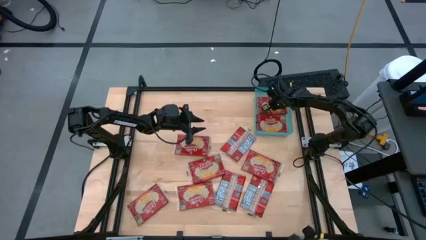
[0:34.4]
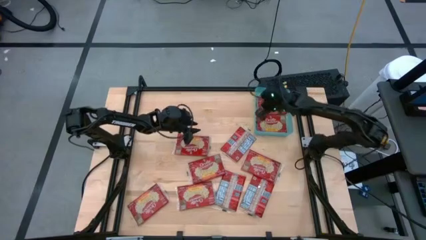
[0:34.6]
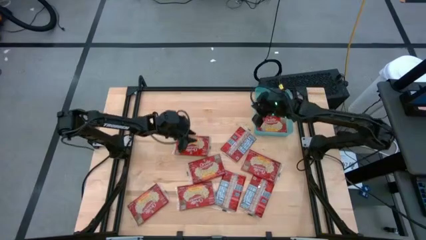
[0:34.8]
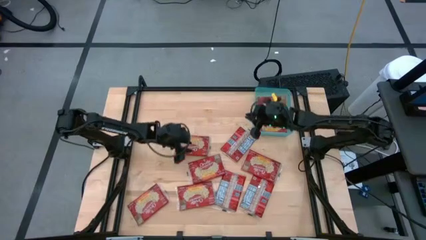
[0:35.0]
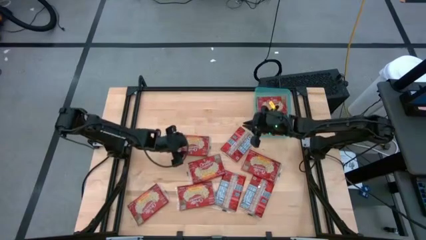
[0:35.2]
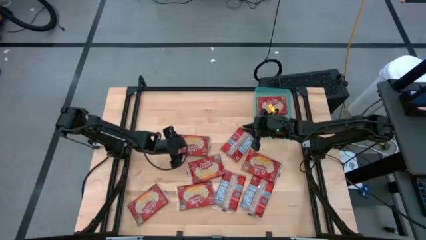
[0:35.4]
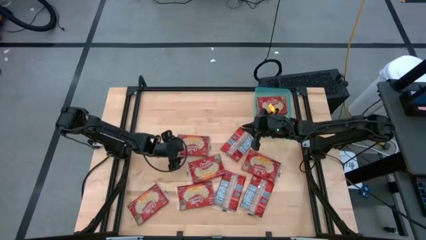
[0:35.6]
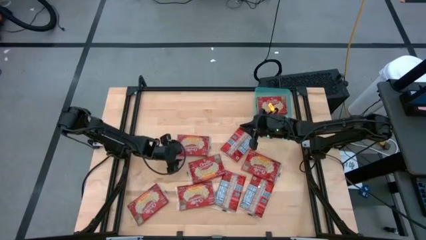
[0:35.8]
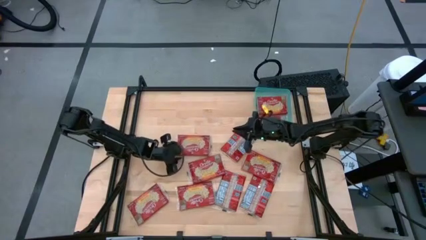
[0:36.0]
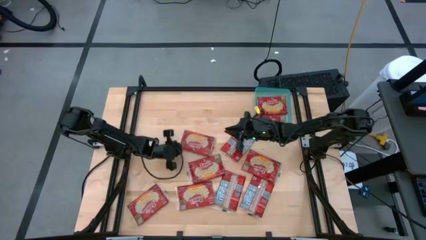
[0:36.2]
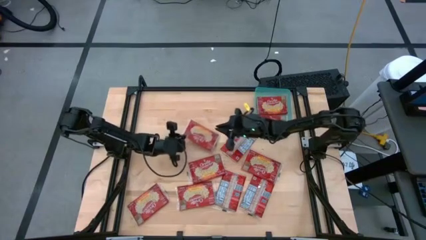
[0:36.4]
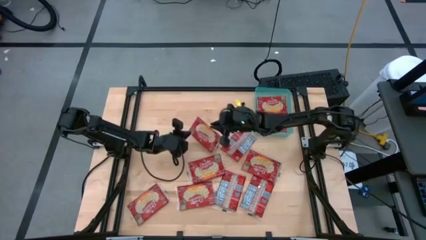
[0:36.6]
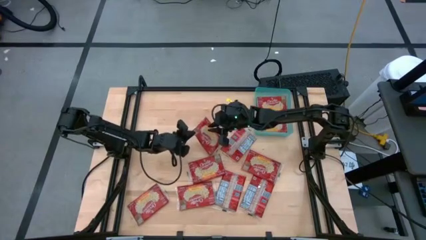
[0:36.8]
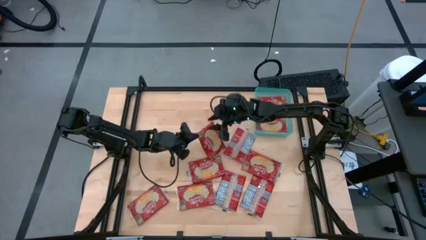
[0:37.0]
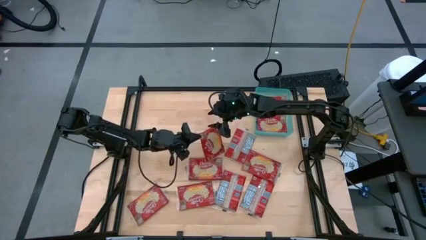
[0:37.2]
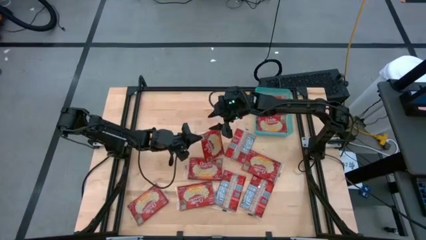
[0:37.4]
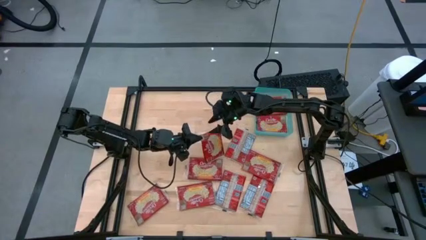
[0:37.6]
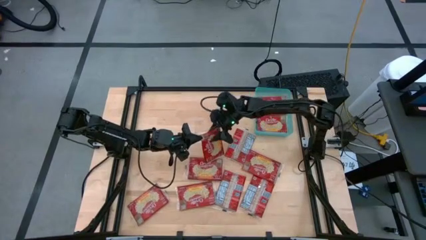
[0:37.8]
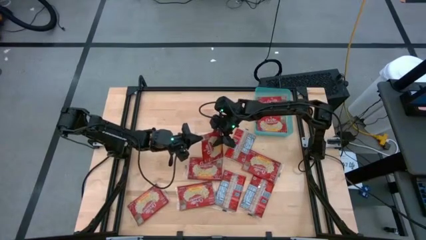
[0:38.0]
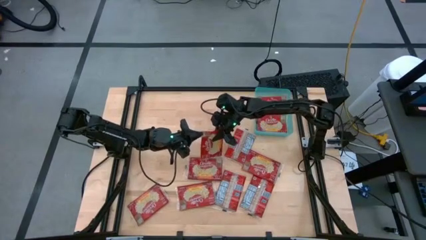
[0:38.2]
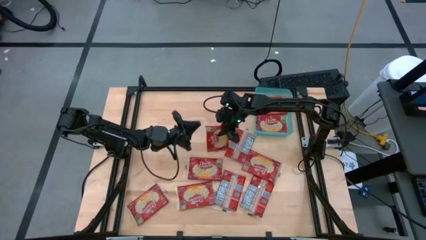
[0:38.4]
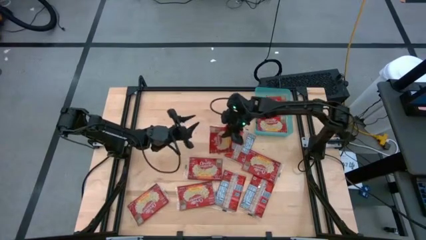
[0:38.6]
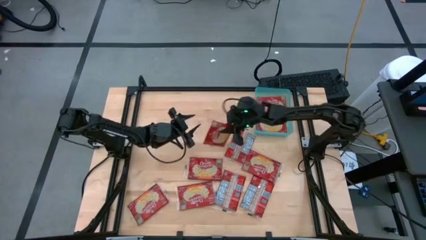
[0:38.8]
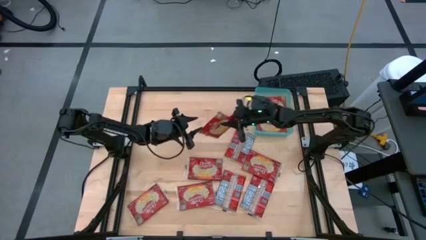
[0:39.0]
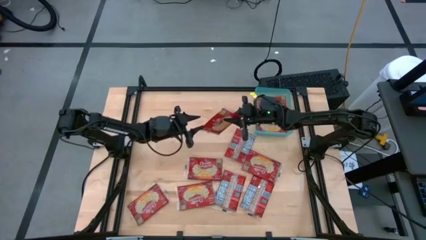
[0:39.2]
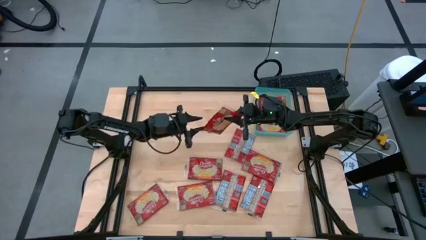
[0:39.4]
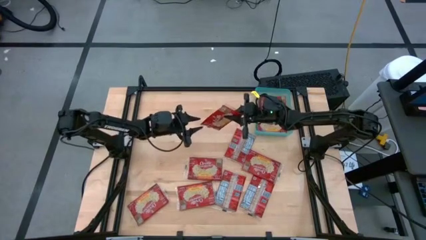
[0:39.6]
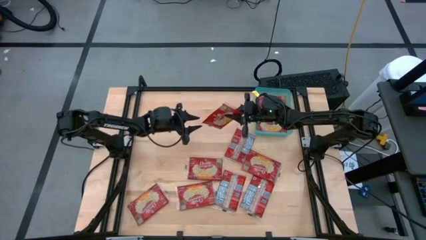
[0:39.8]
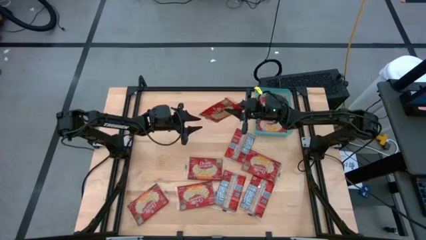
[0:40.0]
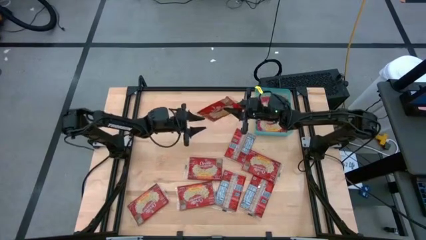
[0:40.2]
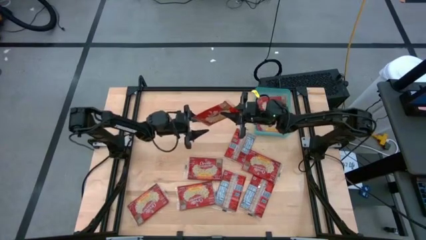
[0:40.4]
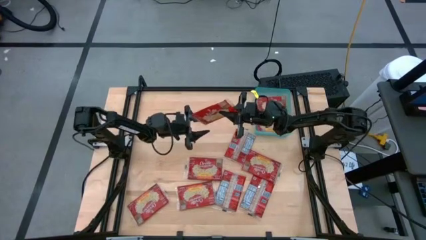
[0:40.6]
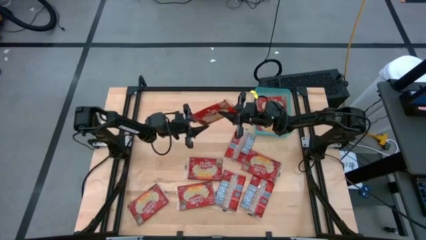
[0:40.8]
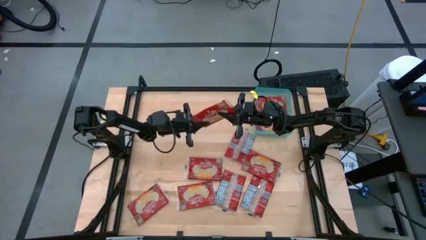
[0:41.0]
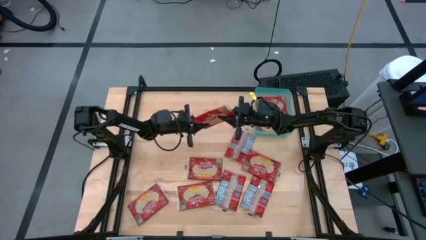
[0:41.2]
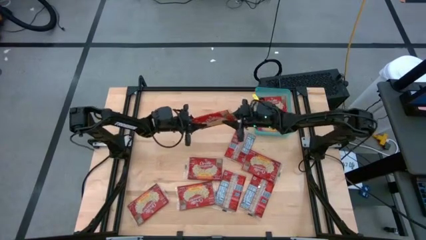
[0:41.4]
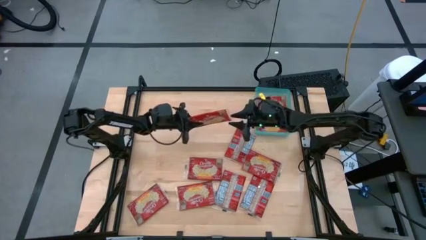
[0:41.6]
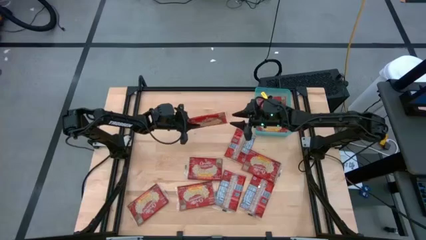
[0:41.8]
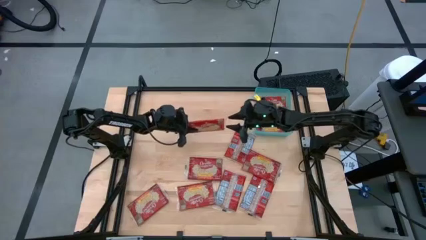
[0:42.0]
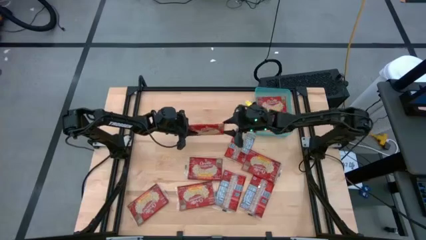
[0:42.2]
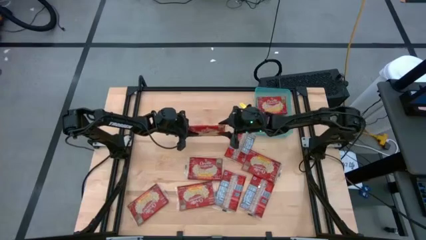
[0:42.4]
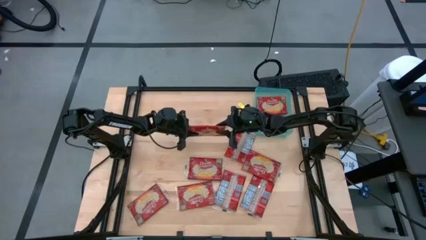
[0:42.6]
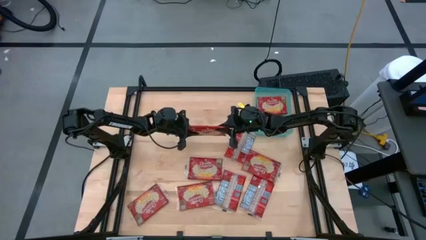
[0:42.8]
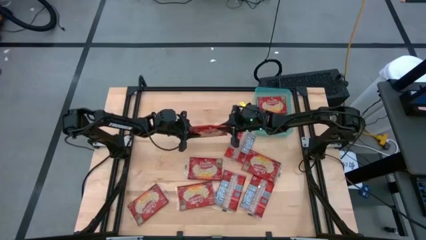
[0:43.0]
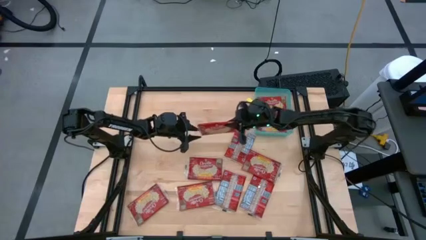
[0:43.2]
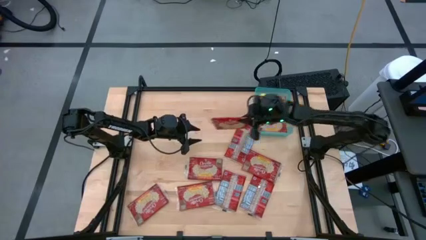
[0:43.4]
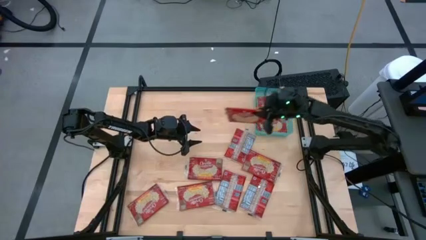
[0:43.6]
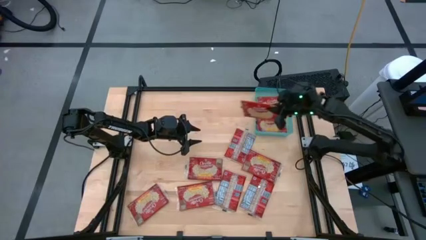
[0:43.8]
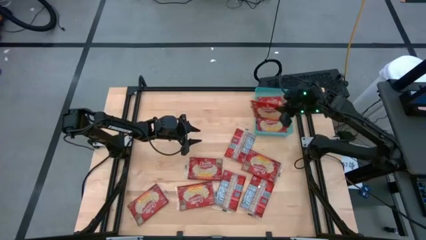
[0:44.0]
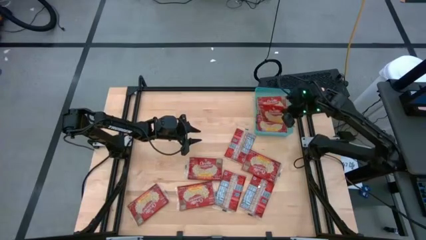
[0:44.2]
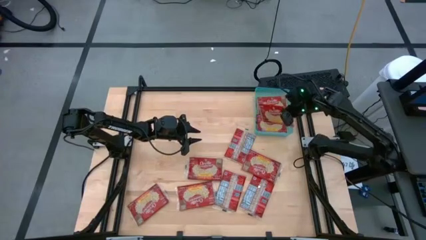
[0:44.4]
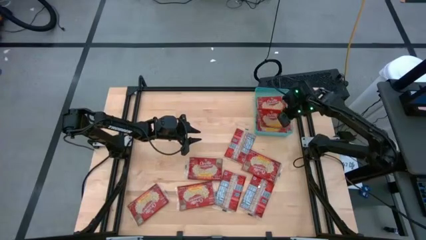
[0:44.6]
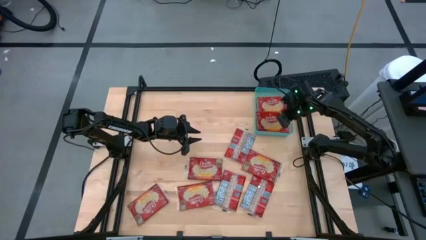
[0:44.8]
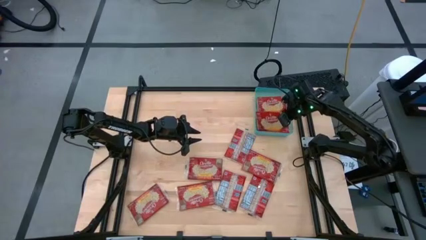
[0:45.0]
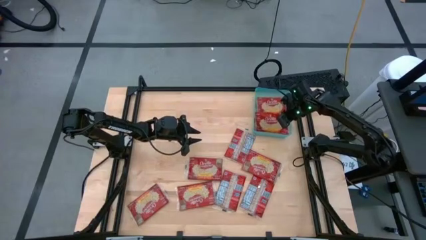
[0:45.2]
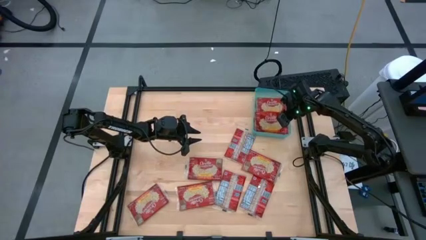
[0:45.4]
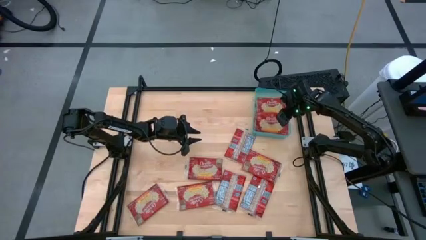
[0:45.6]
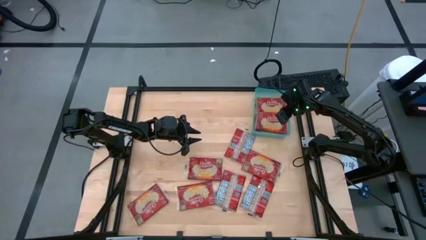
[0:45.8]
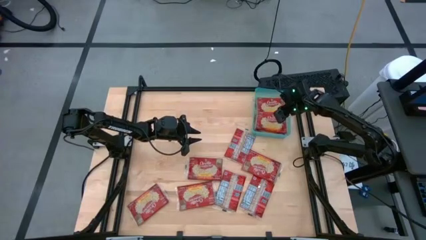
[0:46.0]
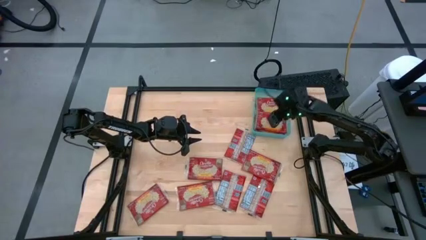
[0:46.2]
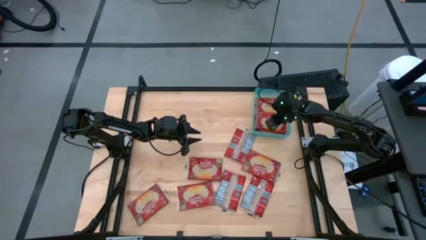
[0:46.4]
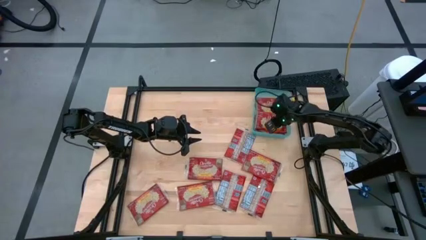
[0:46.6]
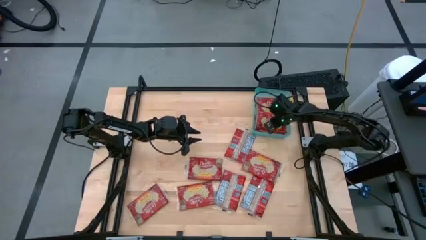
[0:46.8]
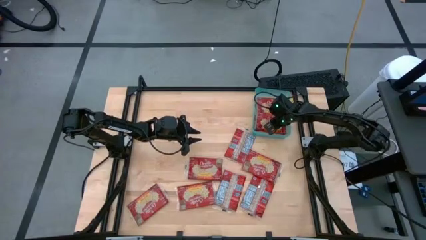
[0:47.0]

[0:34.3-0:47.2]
Task: Sort popcorn bags into baskets
Put the red popcorn bag into the green bin
